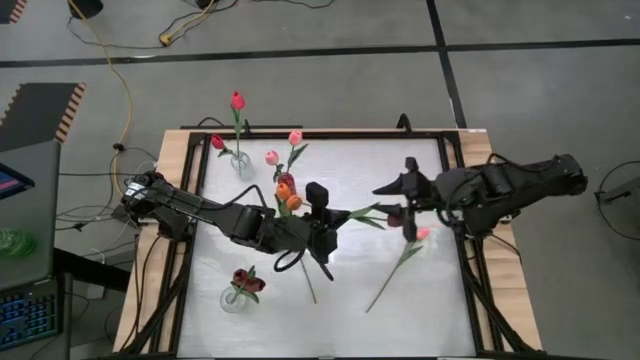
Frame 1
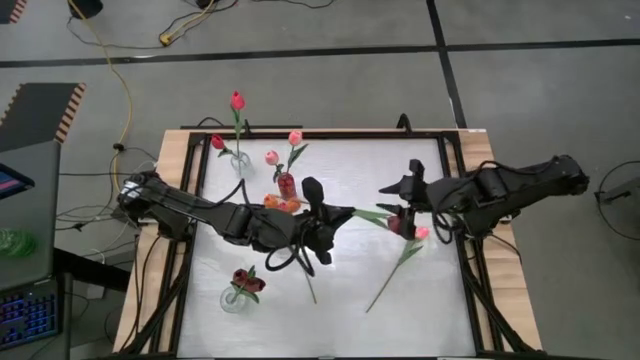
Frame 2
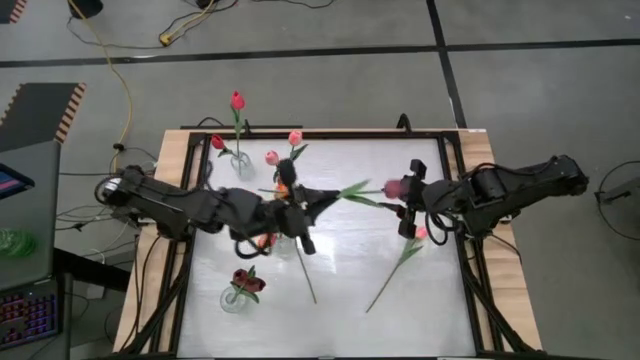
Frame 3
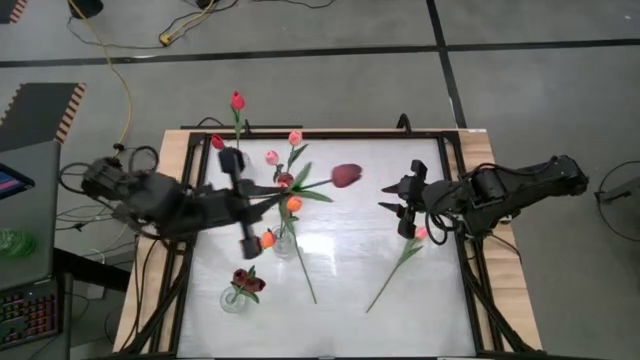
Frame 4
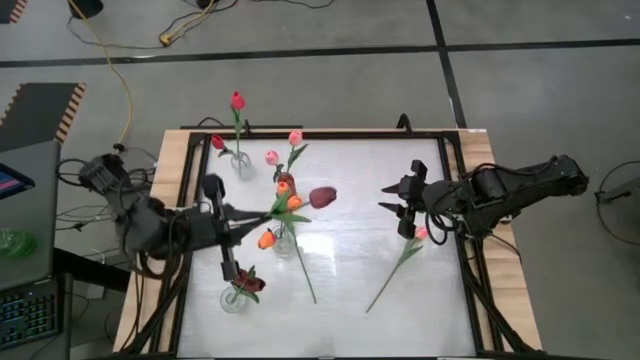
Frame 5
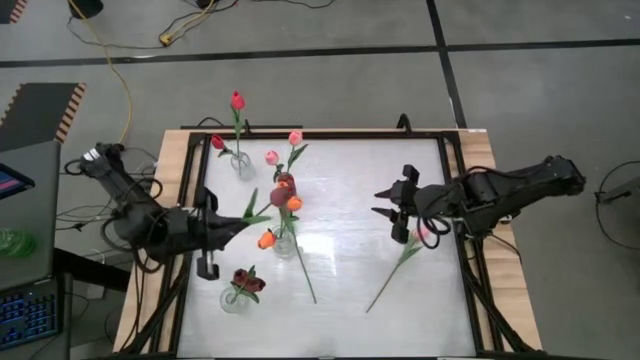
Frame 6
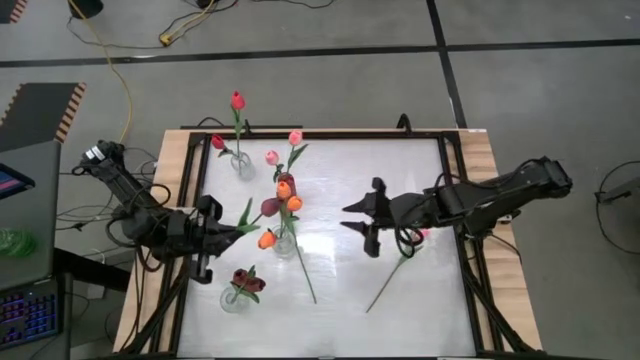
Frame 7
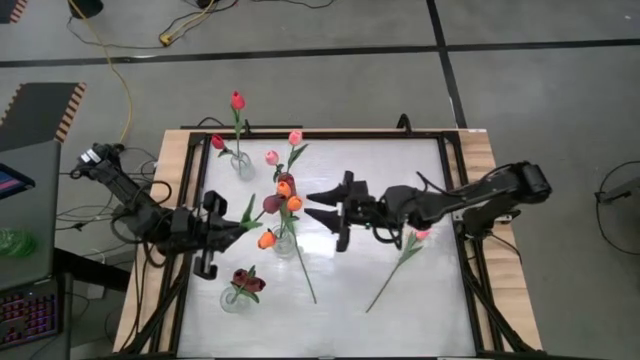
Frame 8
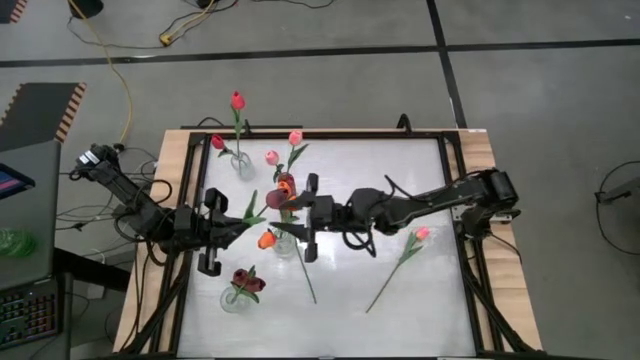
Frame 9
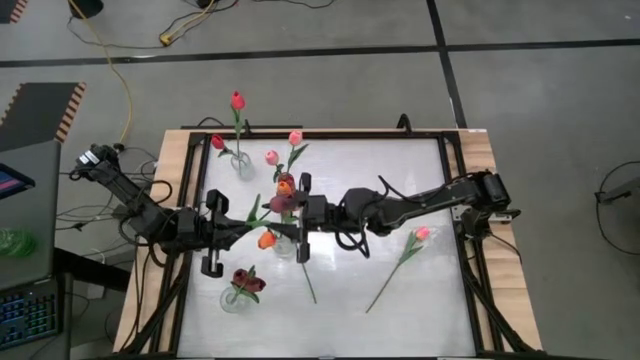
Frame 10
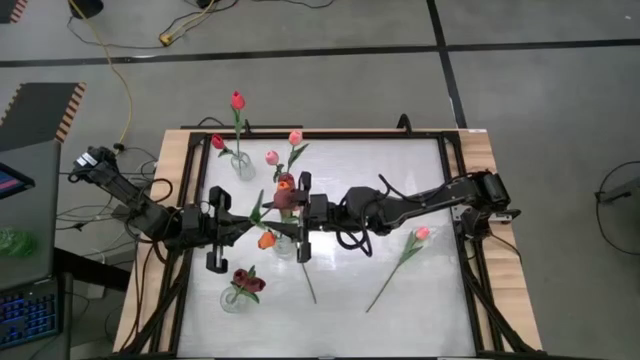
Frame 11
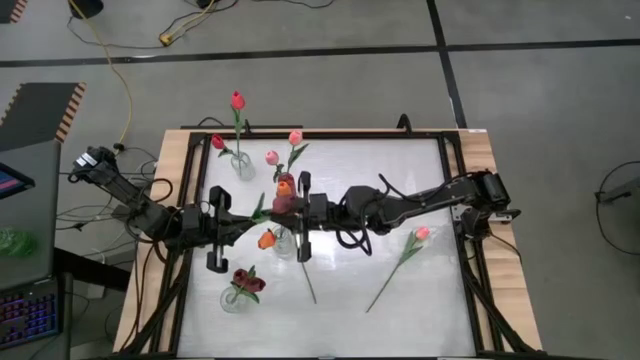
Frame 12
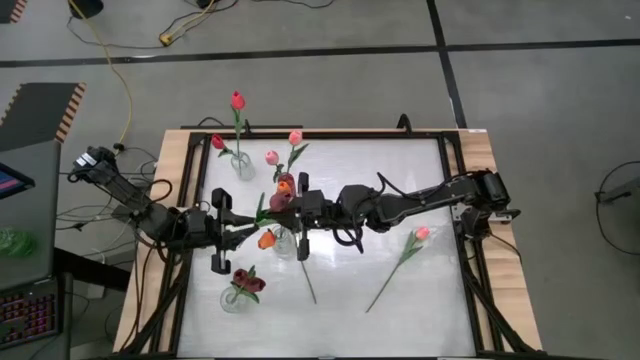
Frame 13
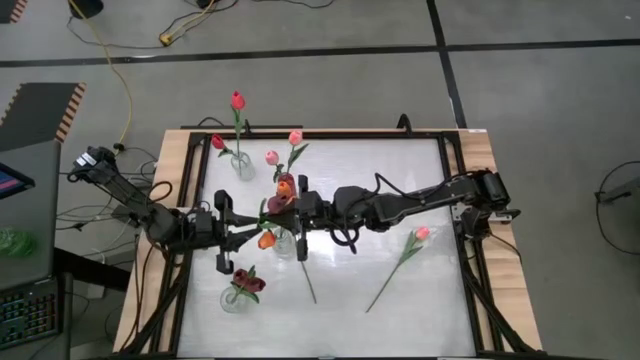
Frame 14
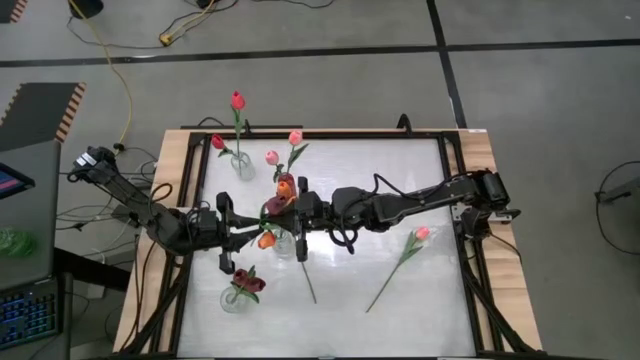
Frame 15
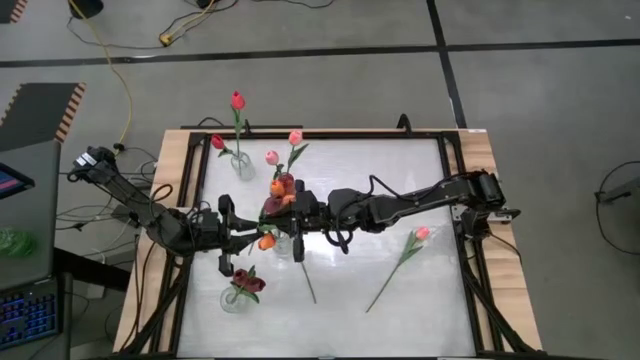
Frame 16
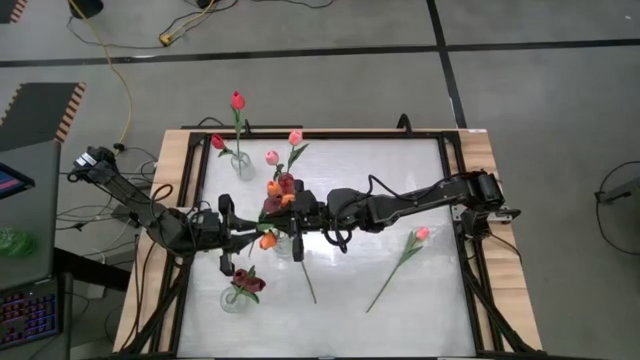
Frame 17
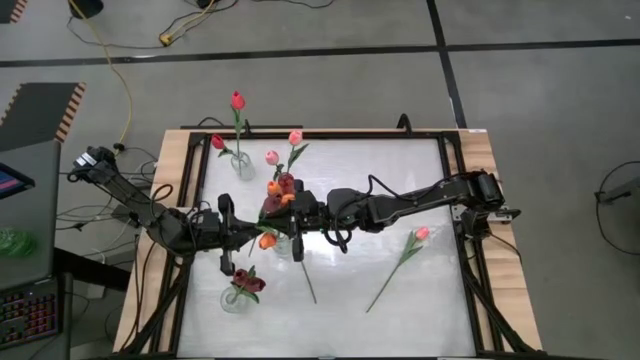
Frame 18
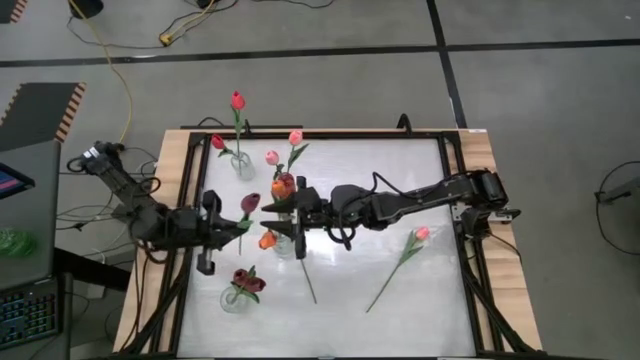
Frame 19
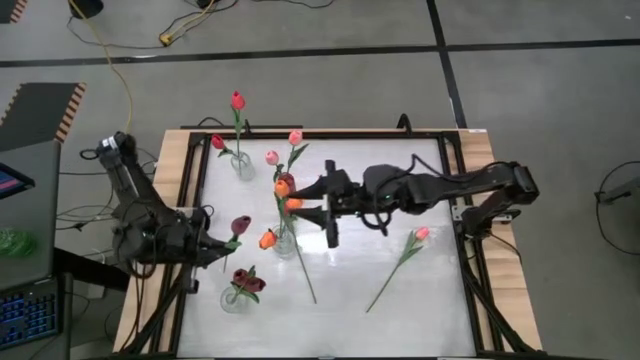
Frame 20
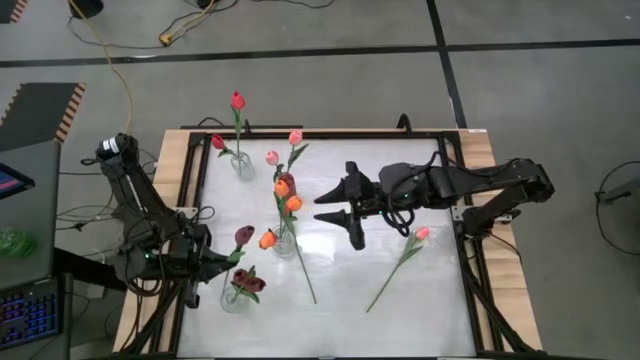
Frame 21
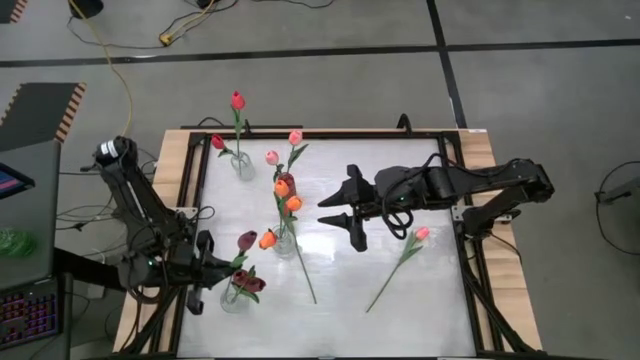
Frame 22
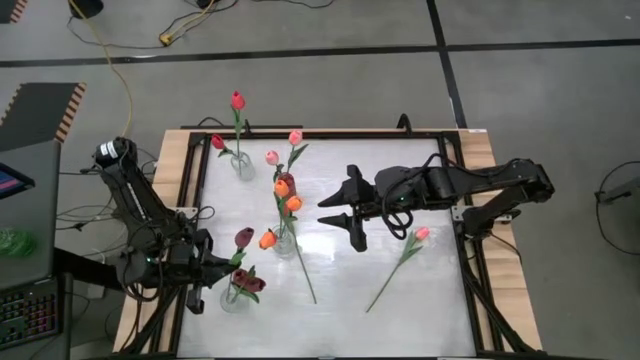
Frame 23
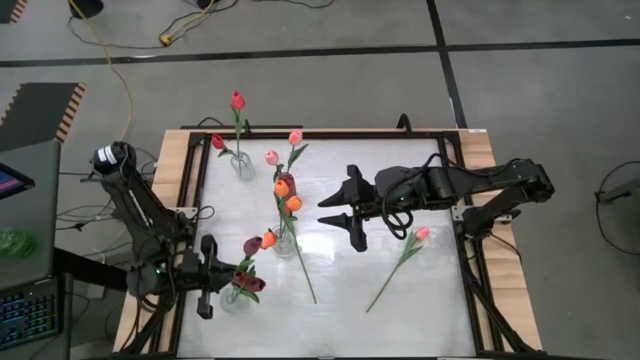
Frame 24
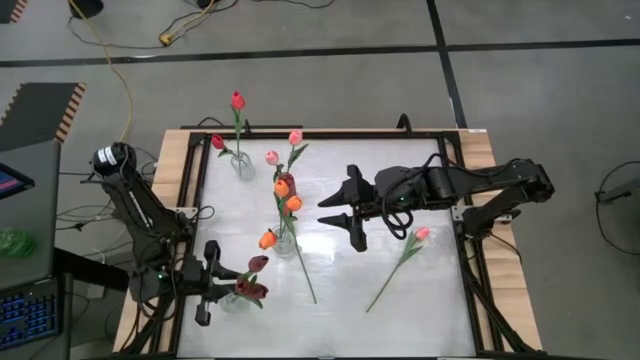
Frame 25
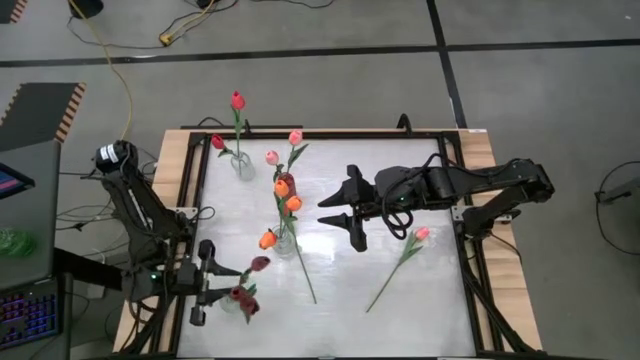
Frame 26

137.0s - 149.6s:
Task: Sort flowers into vase by color
Put the dark red tulip into the bottom transparent vase

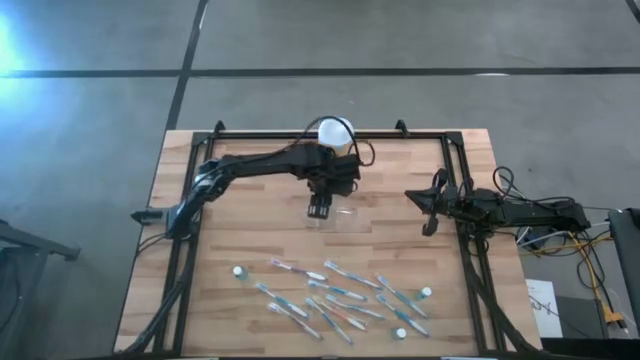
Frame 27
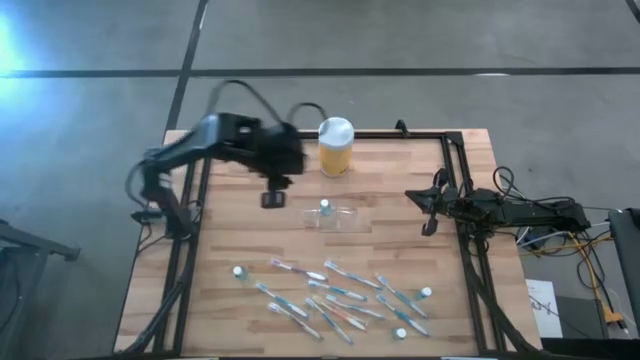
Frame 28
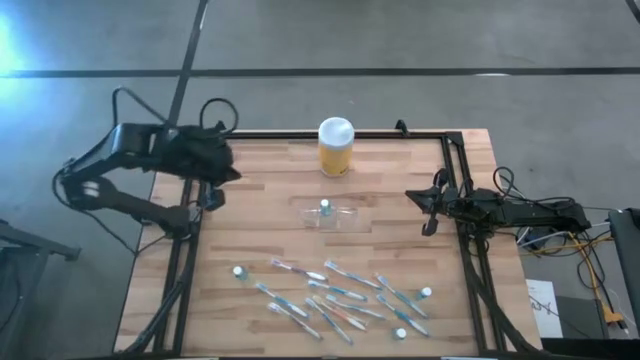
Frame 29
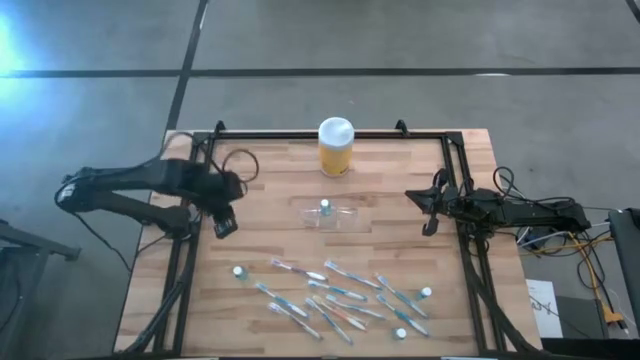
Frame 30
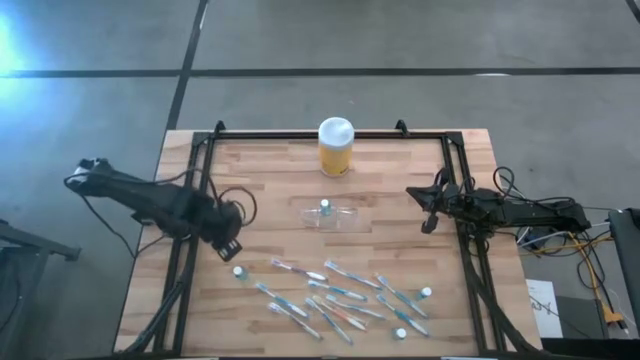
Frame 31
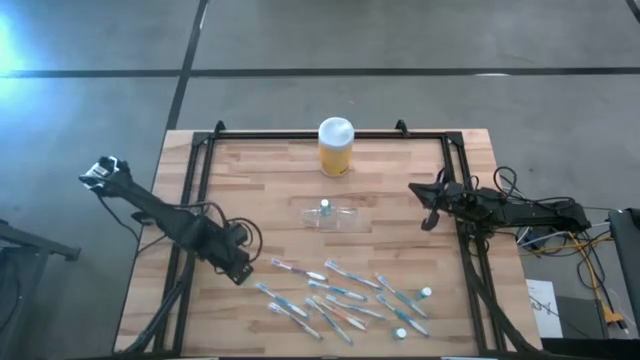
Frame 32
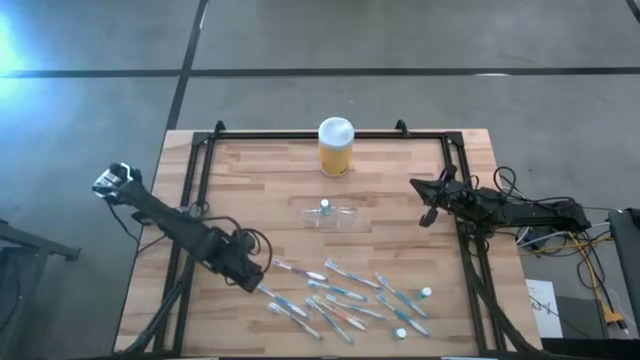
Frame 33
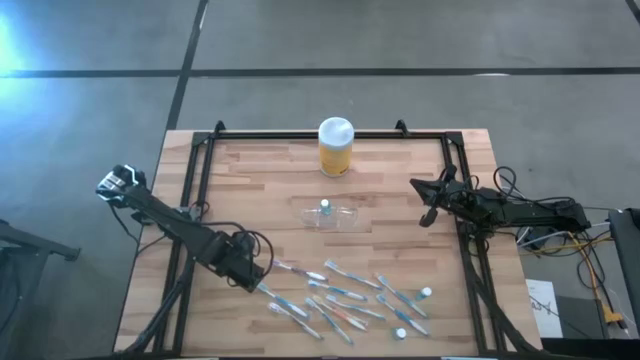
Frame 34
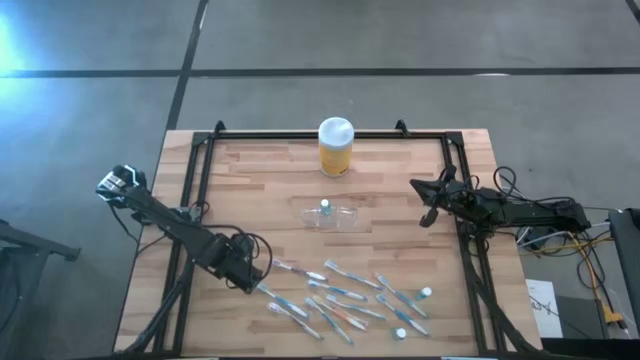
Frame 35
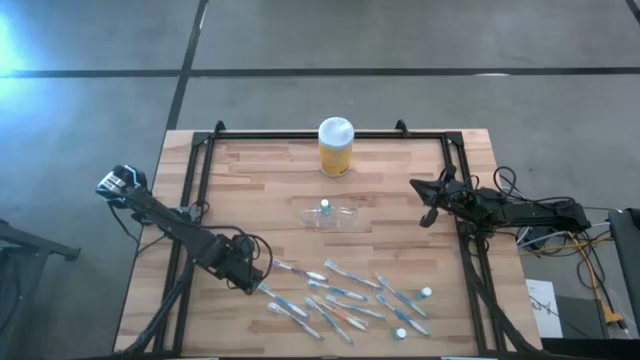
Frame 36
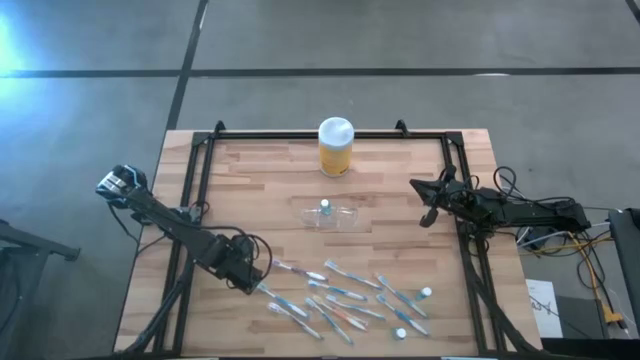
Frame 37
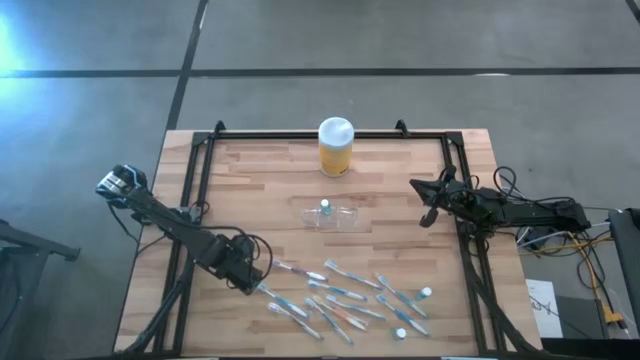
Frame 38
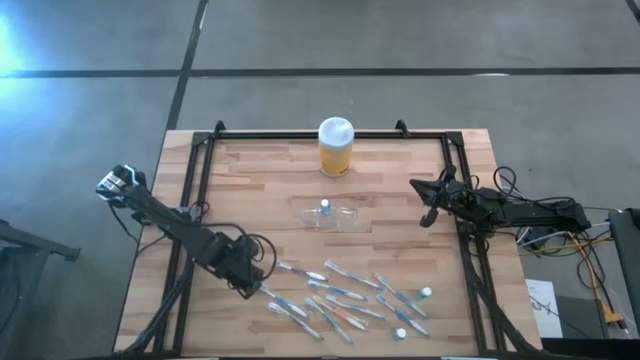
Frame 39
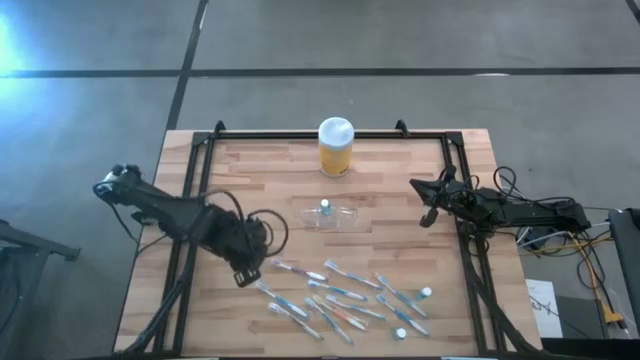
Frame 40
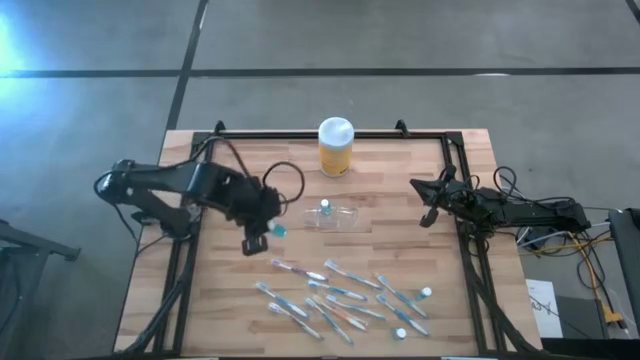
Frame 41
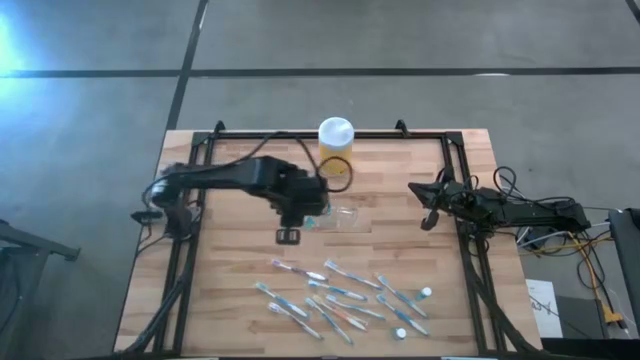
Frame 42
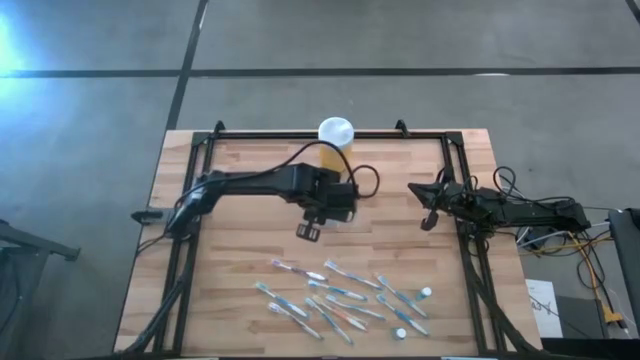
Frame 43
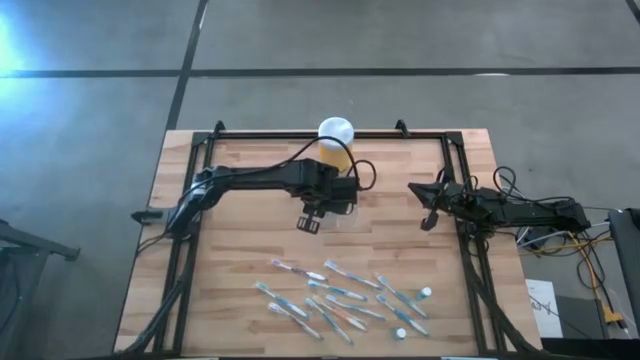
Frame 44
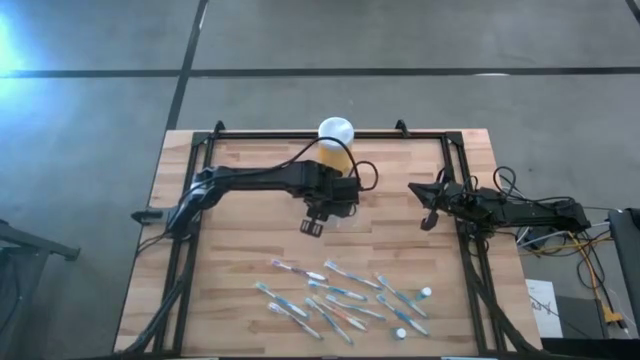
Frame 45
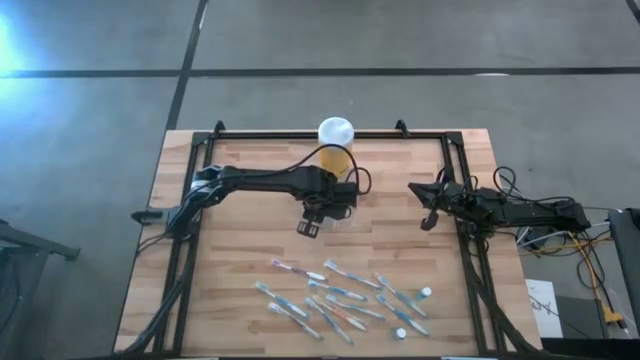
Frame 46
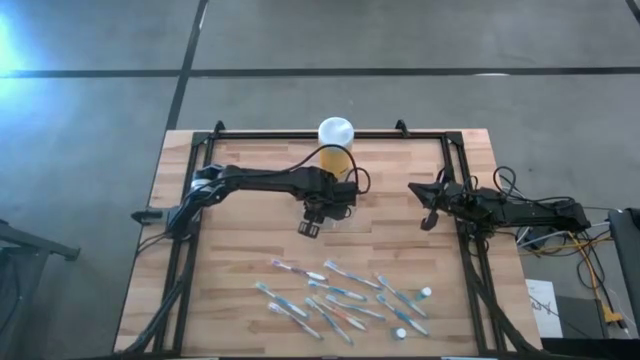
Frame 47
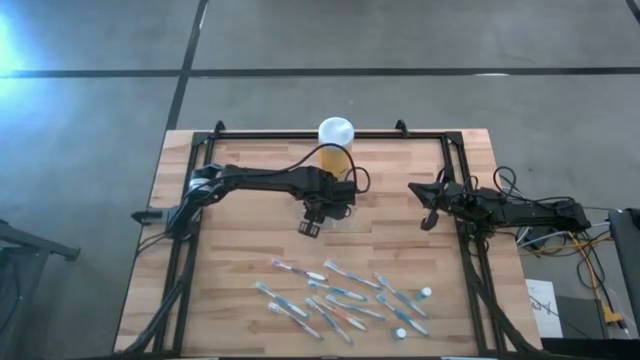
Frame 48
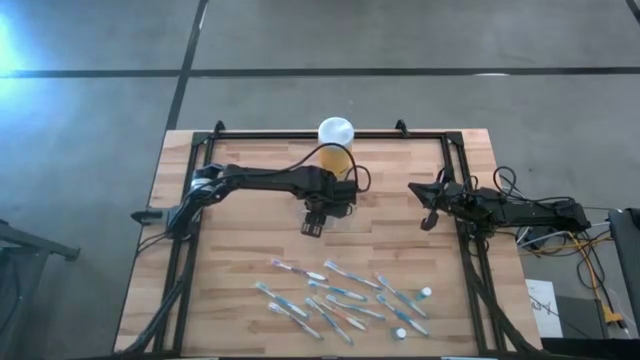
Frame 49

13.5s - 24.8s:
Task: Pick & Place toothbrushing station
Put the mouthwash bottle into the transparent organizer
